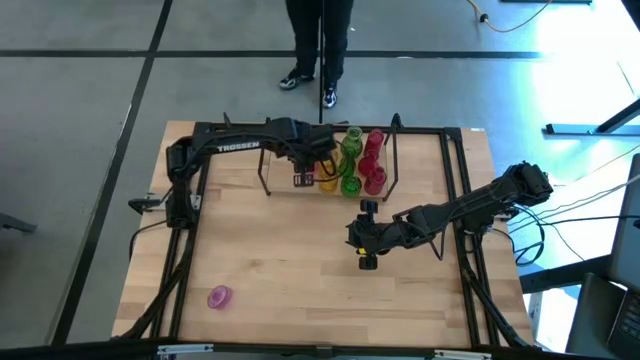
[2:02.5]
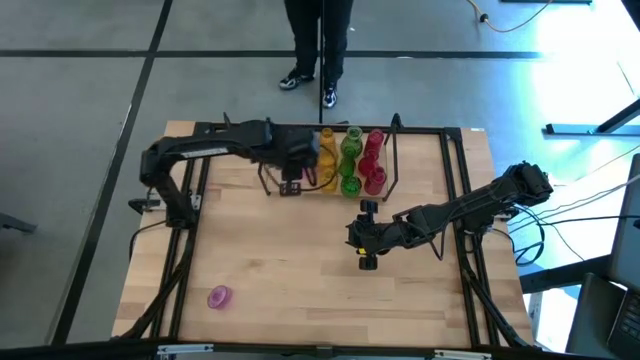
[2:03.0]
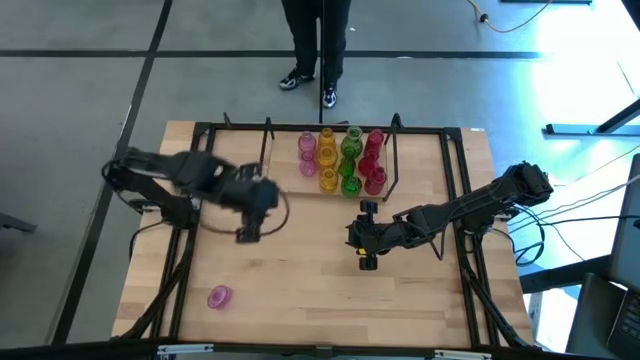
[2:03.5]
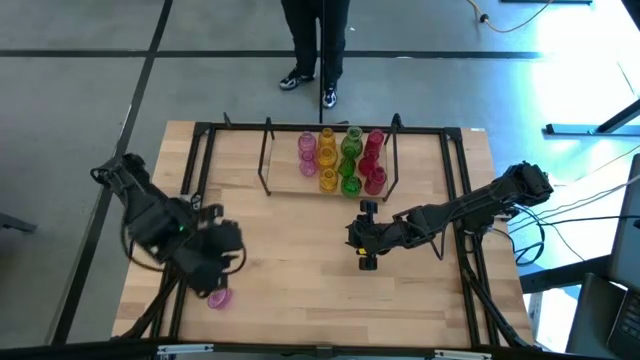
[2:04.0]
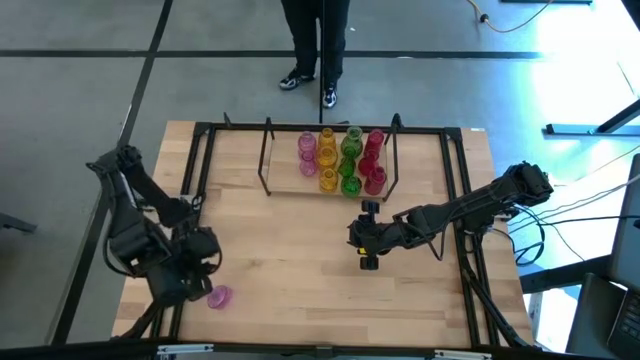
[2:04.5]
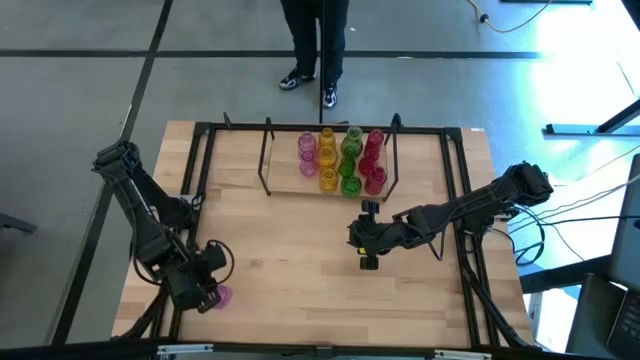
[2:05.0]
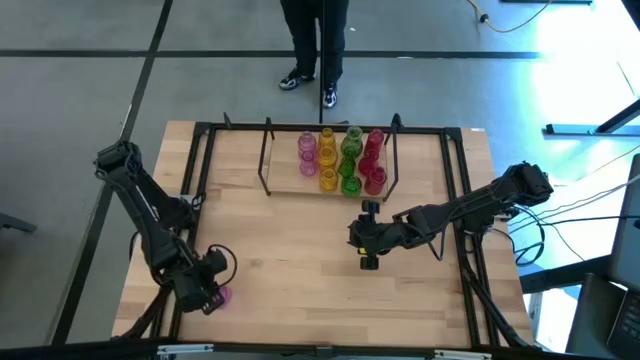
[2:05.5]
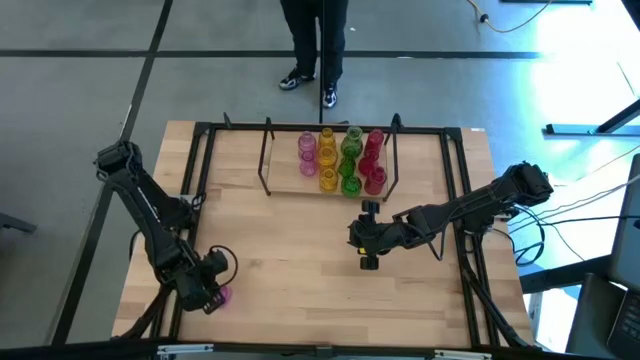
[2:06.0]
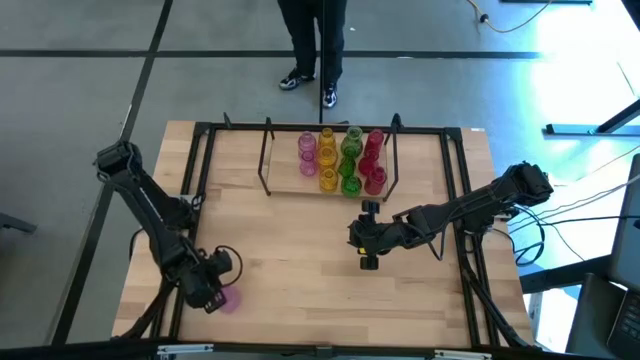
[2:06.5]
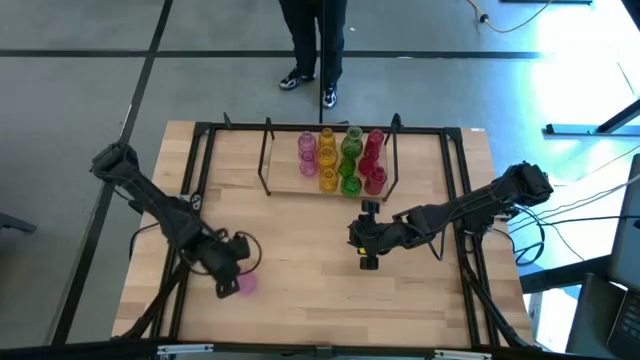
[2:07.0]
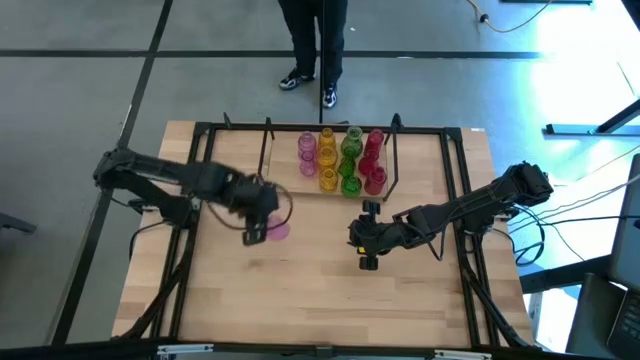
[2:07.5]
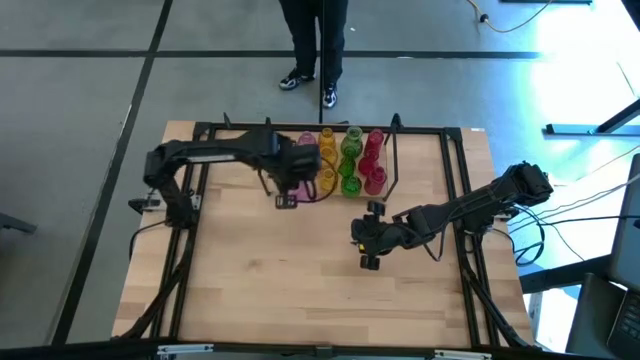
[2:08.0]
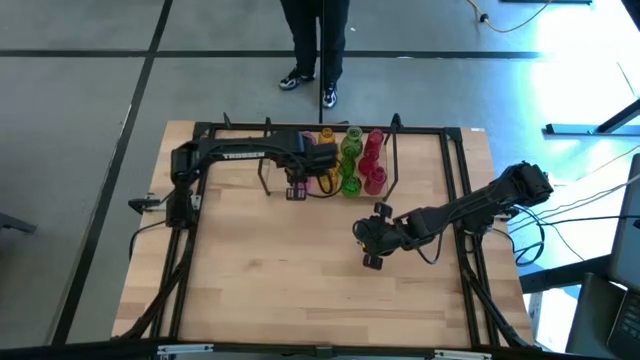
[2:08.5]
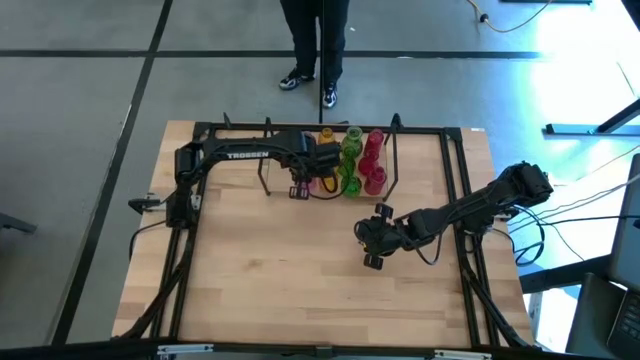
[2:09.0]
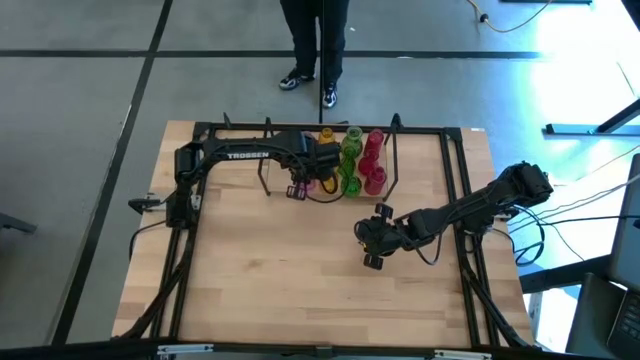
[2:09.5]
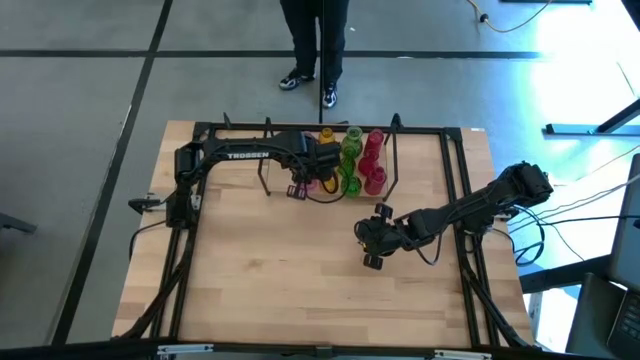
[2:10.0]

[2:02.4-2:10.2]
Task: sort vases onto shelf
Put the violet vase on the shelf aligned with the other violet vases

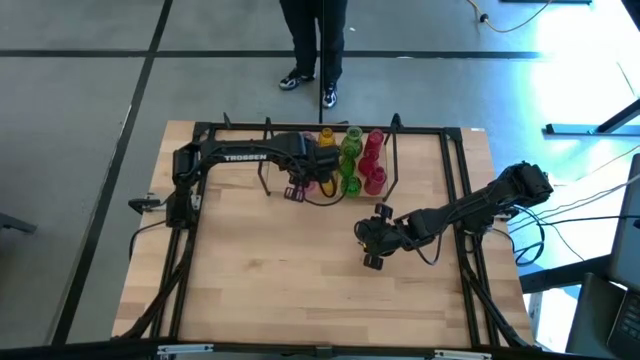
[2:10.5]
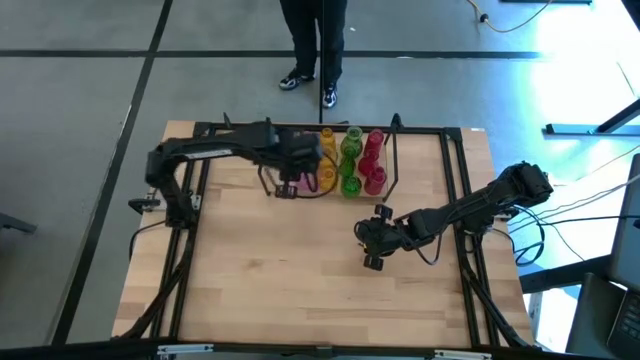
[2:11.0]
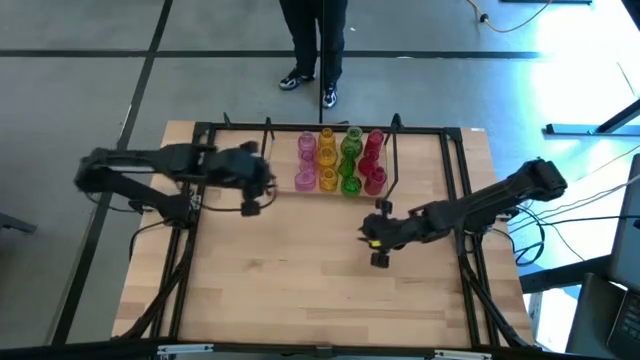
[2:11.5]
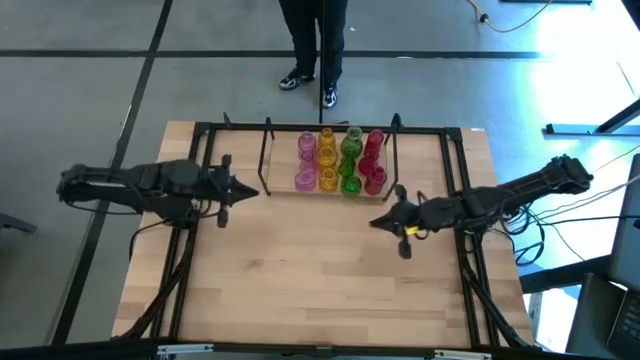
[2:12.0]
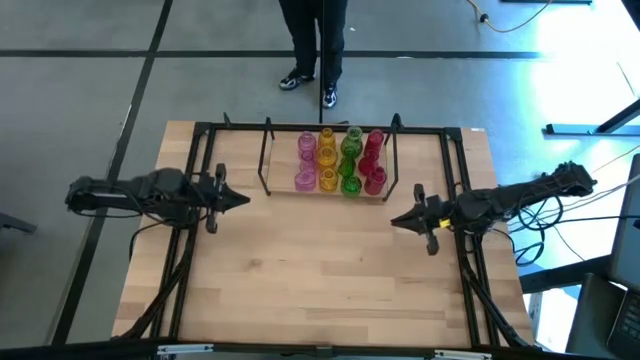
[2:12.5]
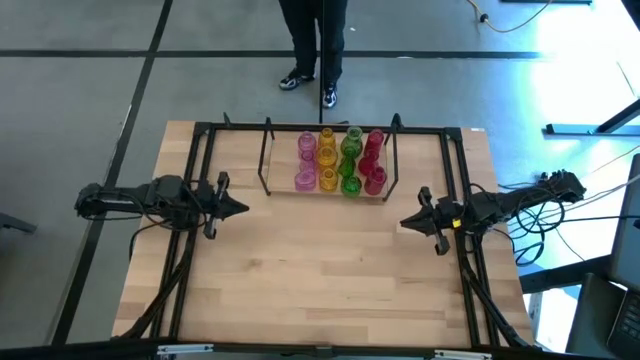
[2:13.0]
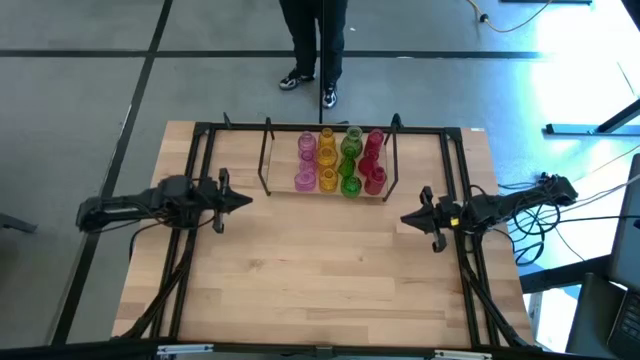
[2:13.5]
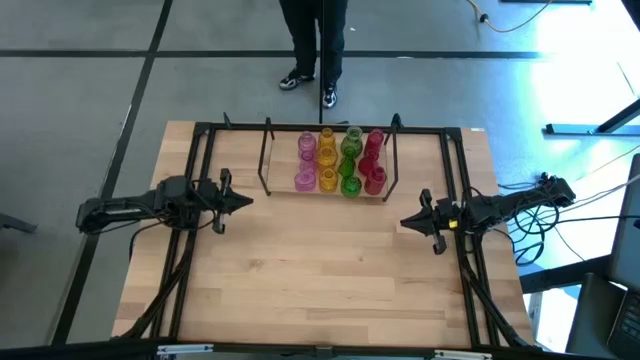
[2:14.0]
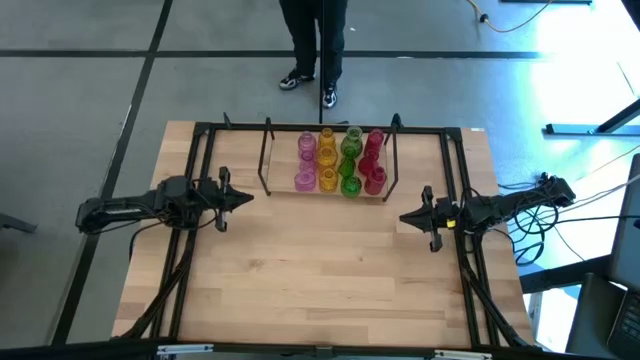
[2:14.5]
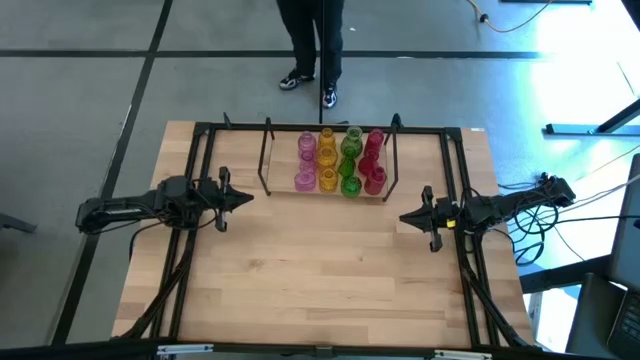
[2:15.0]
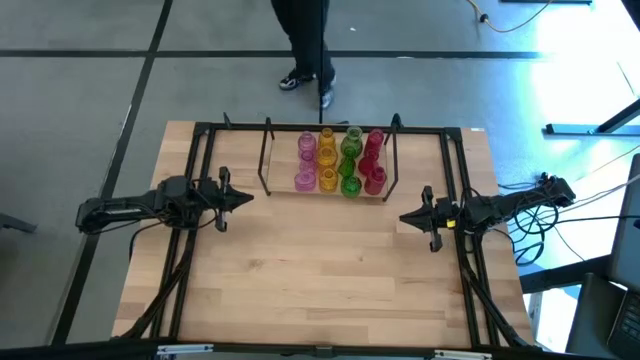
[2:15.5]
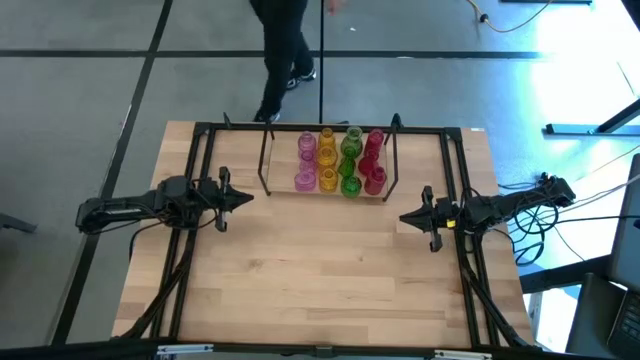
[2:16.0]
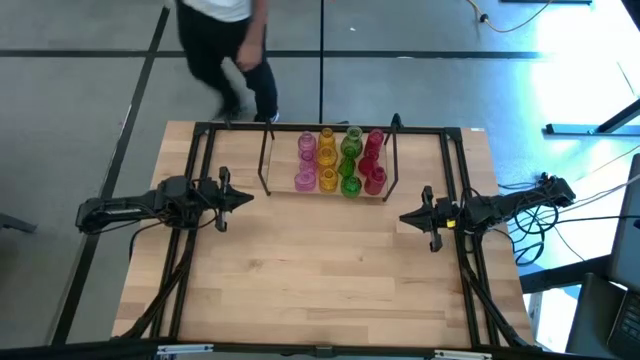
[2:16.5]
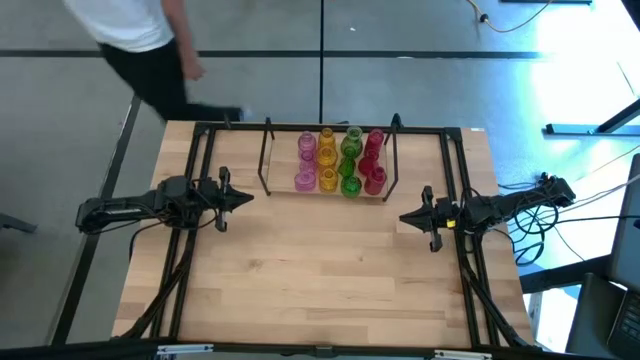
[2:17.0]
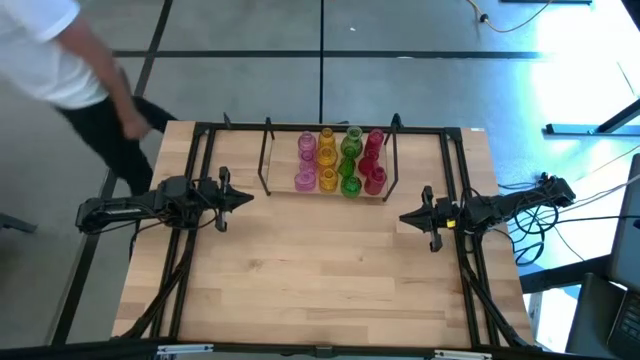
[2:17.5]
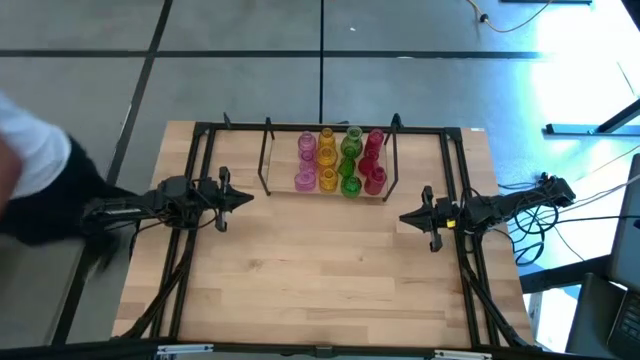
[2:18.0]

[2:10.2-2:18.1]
Return to Home Position

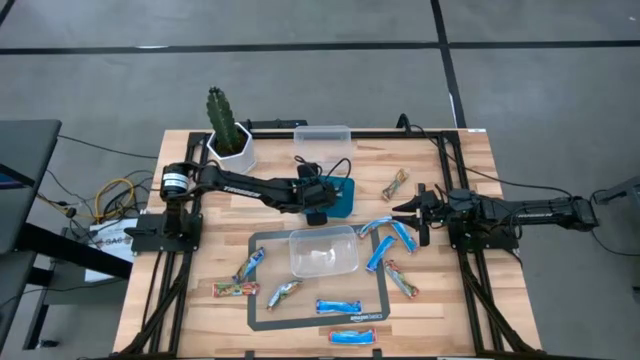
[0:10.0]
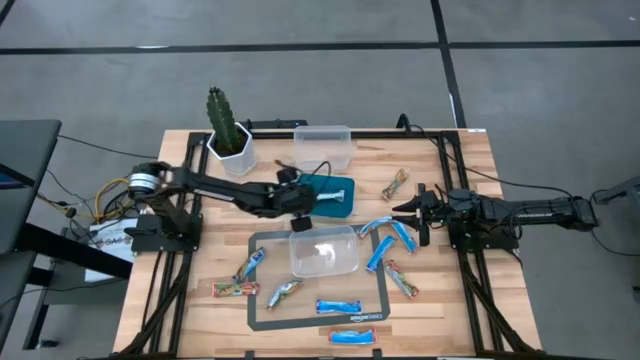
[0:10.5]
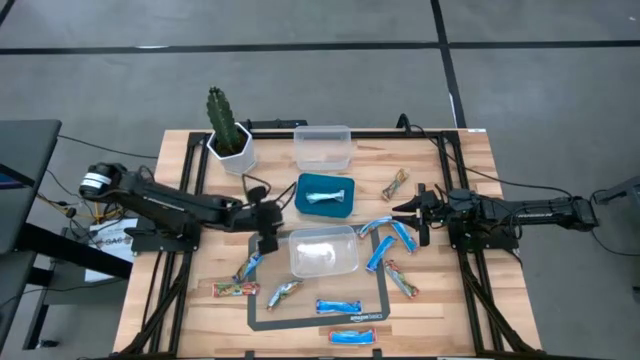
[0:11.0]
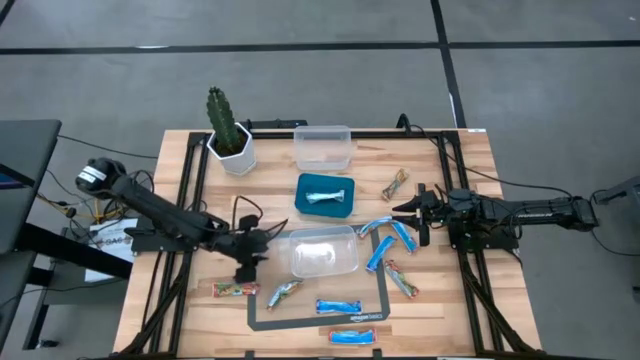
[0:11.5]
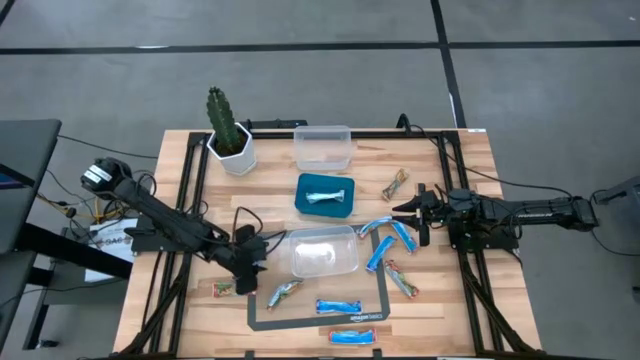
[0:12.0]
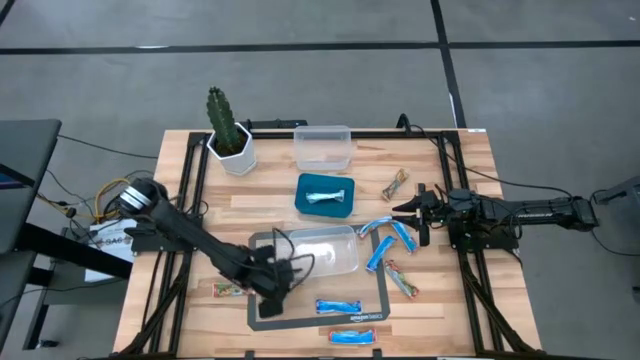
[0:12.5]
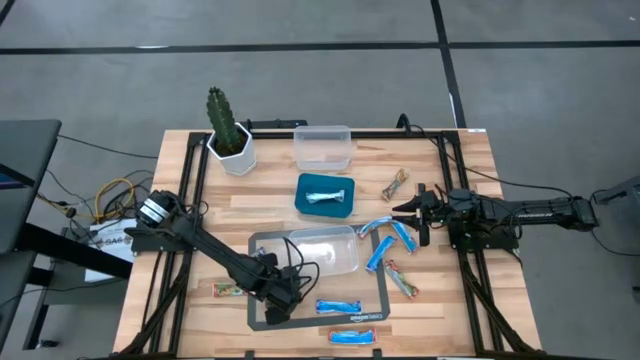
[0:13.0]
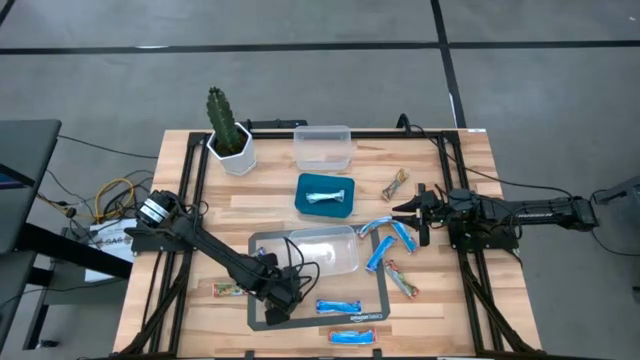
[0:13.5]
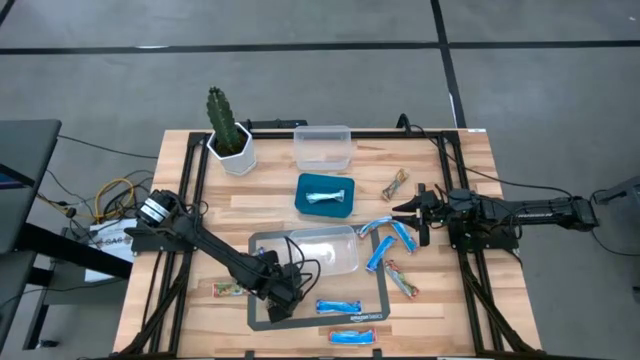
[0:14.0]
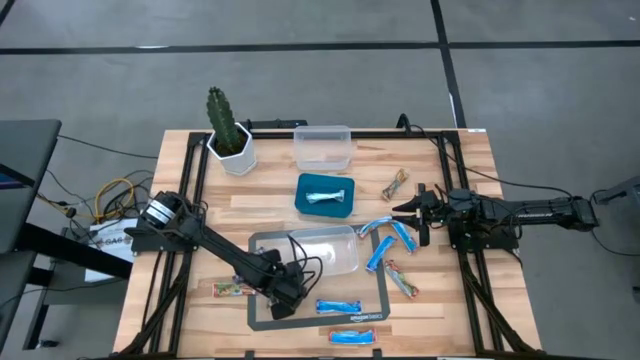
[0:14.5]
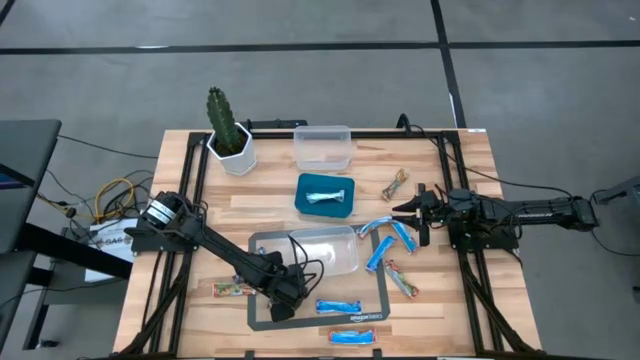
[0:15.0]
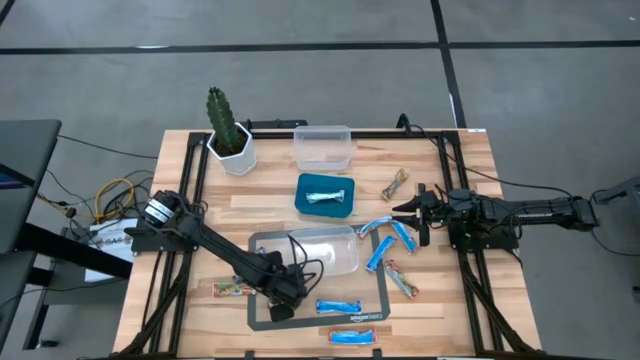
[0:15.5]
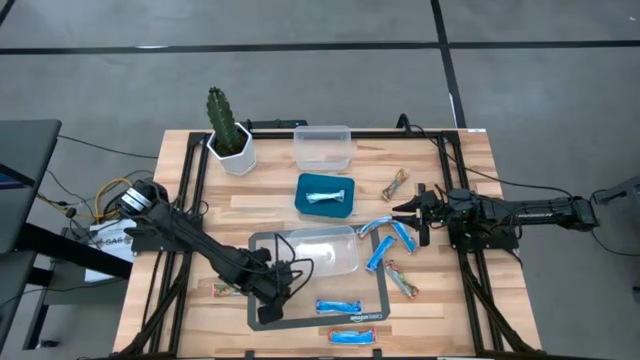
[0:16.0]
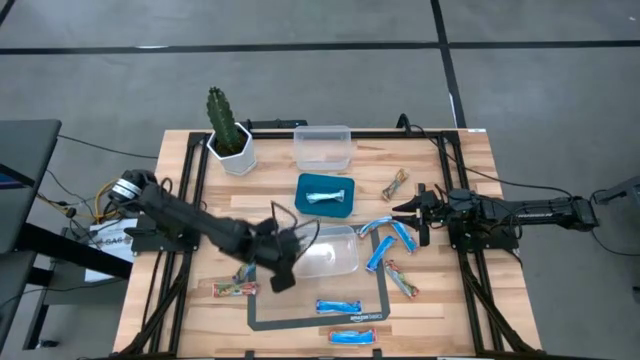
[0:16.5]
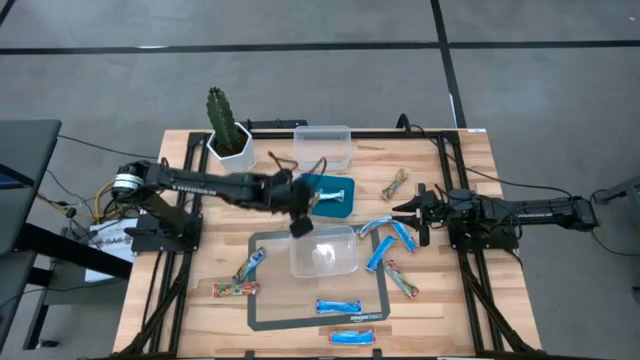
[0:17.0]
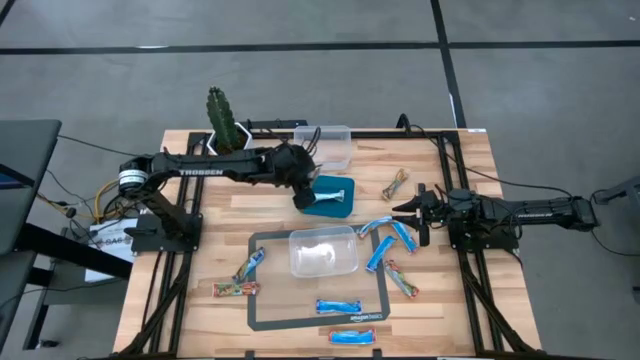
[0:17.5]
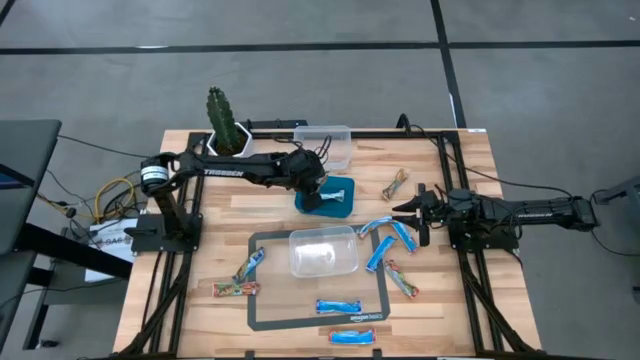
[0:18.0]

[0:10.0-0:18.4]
Task: Pick and place Granola Bars by type
Put the yellow granola bar into the blue bin
